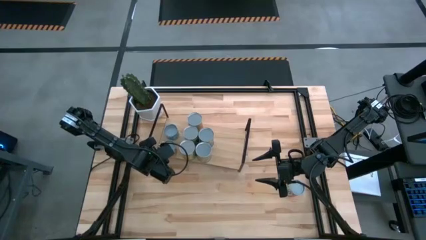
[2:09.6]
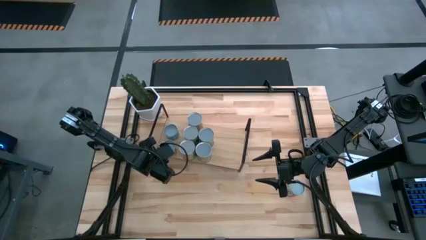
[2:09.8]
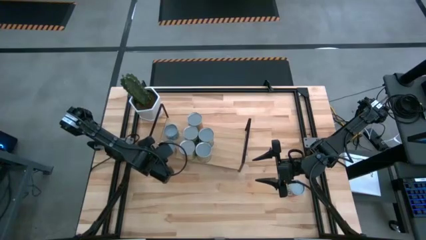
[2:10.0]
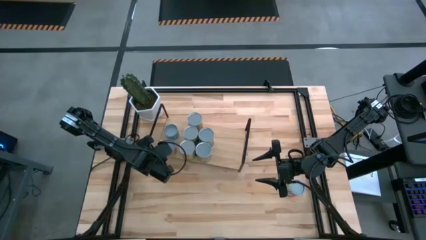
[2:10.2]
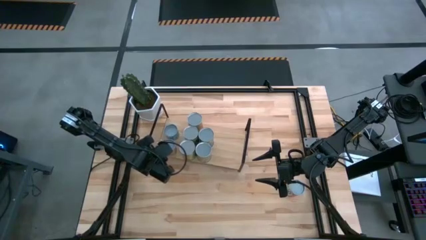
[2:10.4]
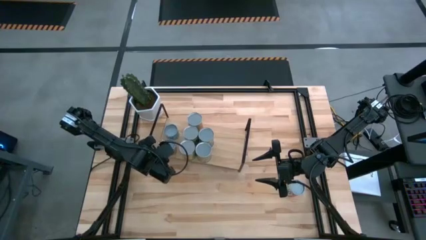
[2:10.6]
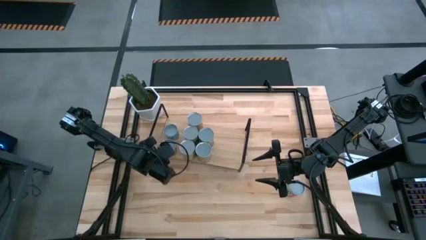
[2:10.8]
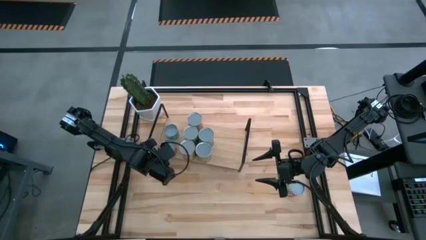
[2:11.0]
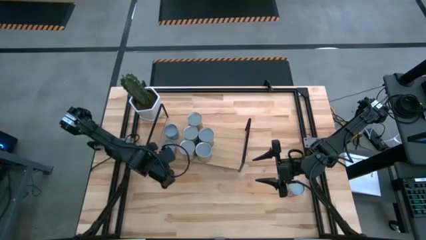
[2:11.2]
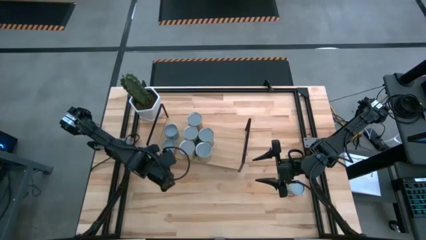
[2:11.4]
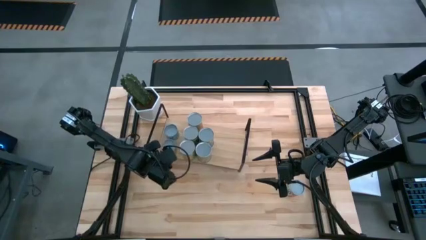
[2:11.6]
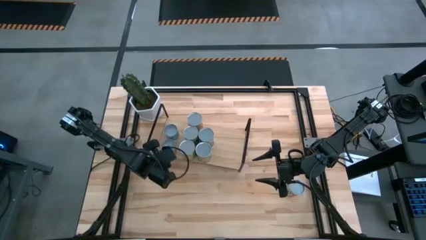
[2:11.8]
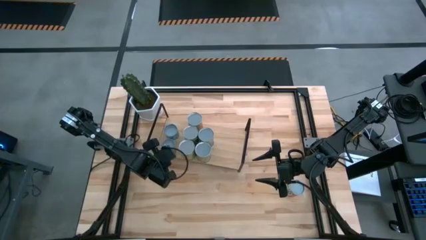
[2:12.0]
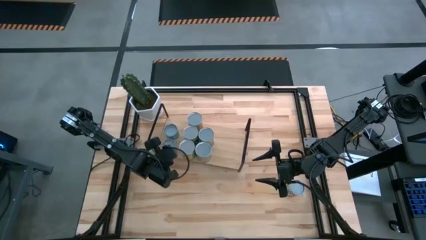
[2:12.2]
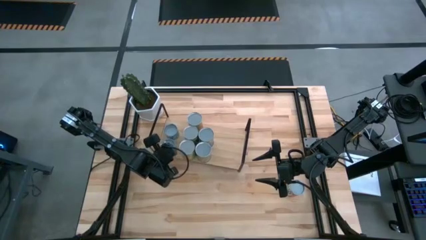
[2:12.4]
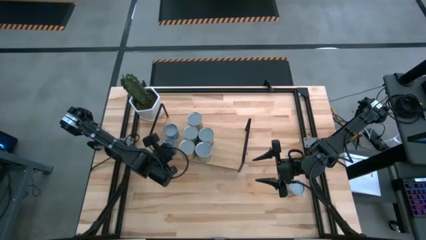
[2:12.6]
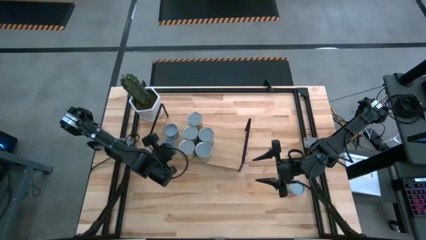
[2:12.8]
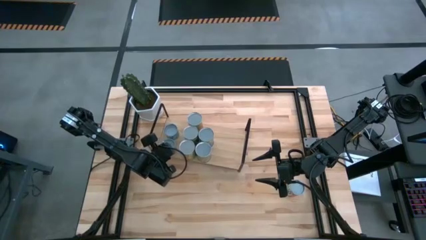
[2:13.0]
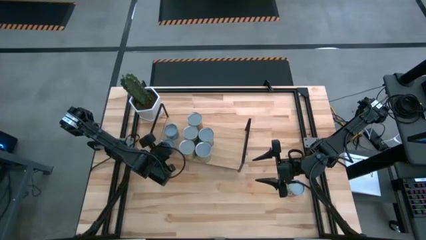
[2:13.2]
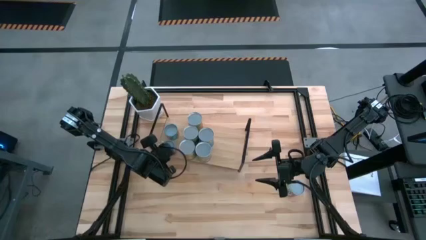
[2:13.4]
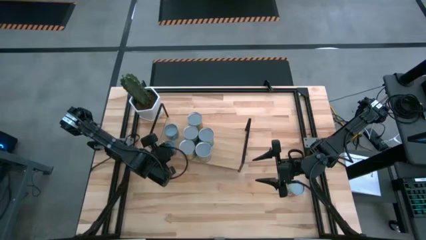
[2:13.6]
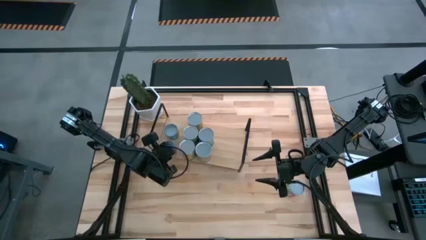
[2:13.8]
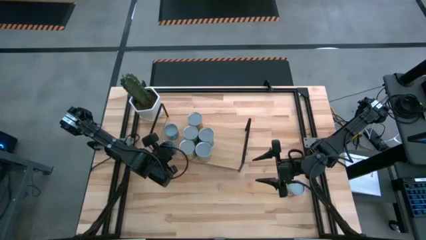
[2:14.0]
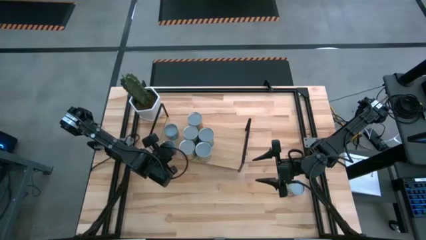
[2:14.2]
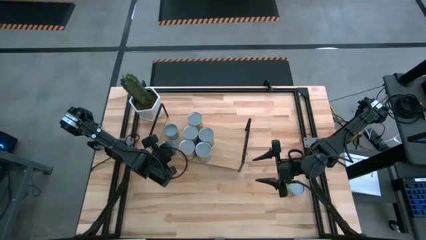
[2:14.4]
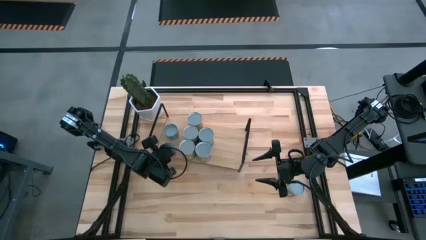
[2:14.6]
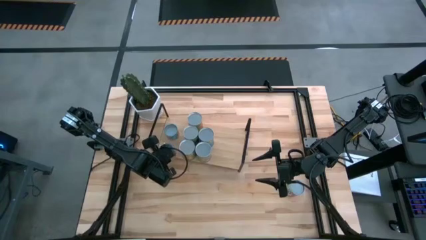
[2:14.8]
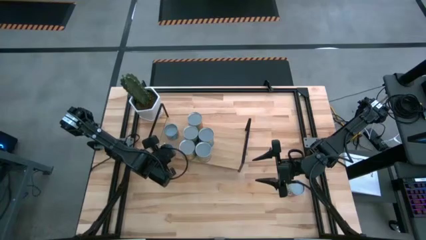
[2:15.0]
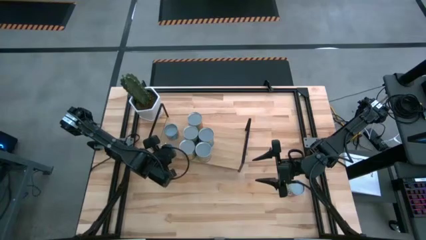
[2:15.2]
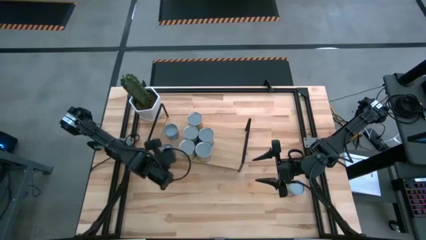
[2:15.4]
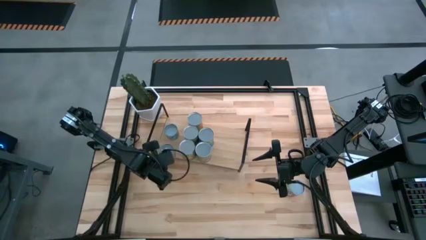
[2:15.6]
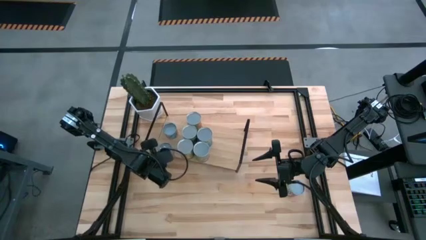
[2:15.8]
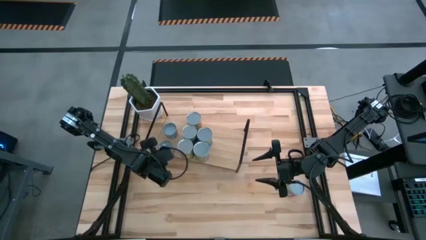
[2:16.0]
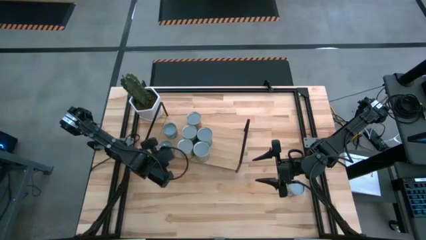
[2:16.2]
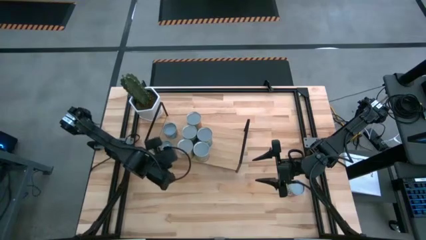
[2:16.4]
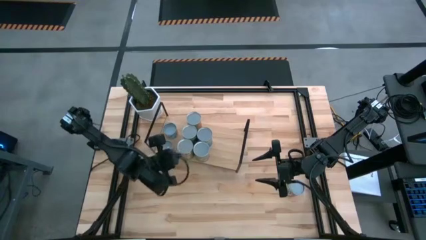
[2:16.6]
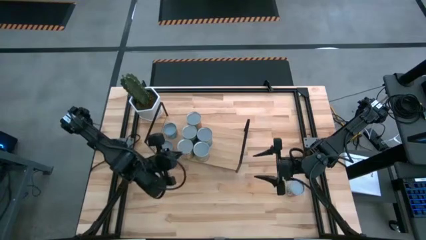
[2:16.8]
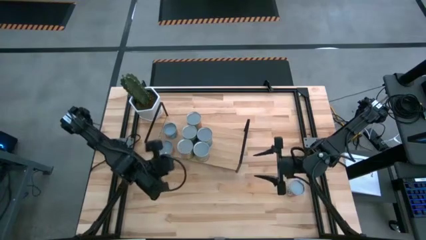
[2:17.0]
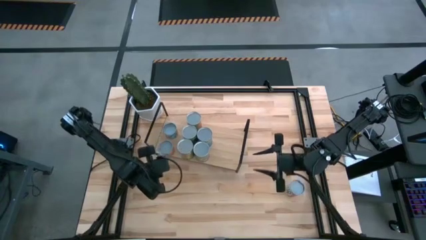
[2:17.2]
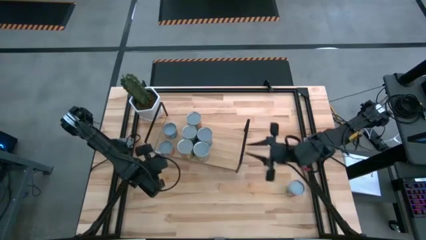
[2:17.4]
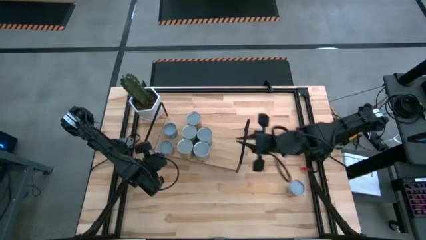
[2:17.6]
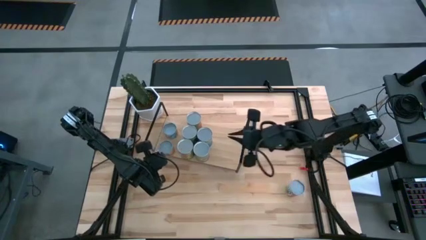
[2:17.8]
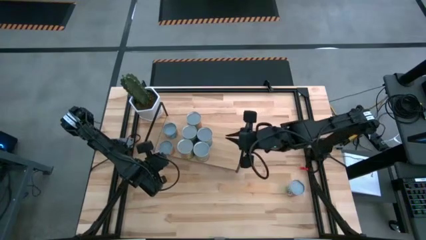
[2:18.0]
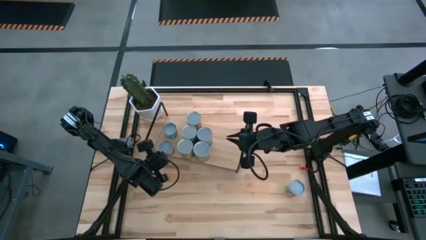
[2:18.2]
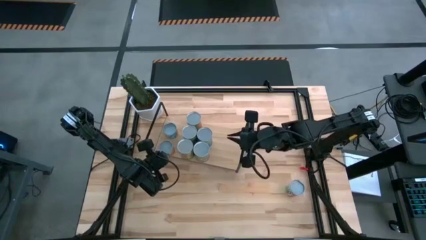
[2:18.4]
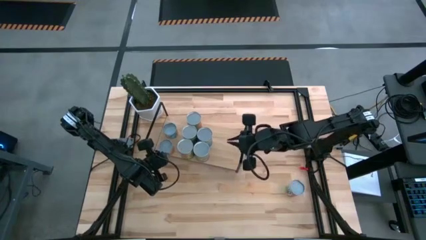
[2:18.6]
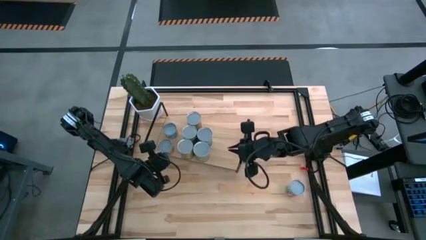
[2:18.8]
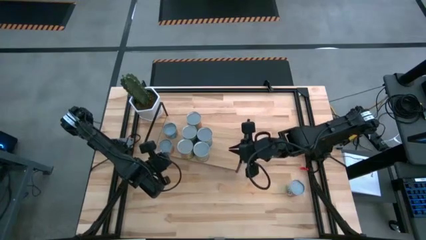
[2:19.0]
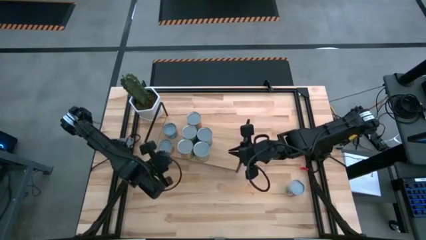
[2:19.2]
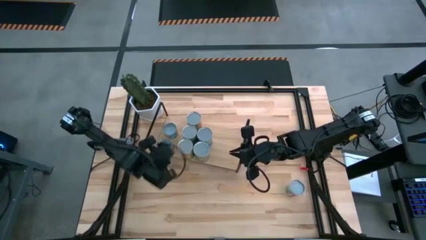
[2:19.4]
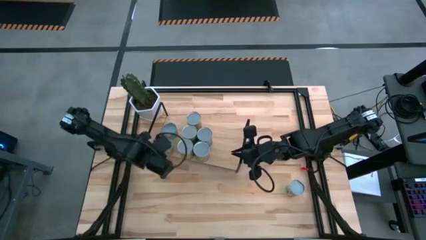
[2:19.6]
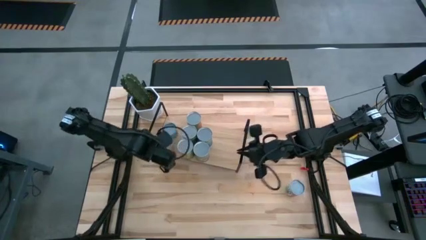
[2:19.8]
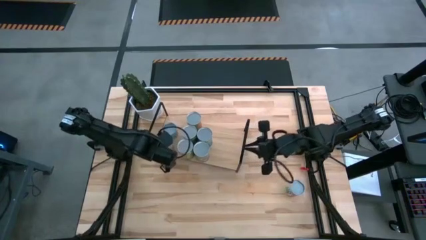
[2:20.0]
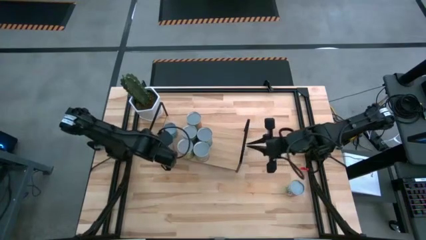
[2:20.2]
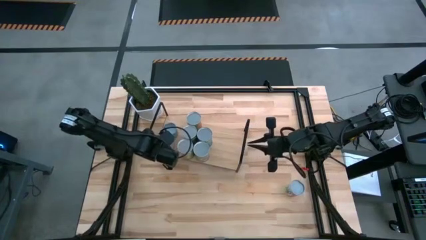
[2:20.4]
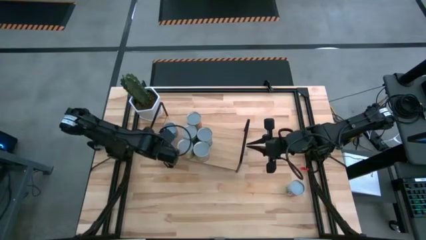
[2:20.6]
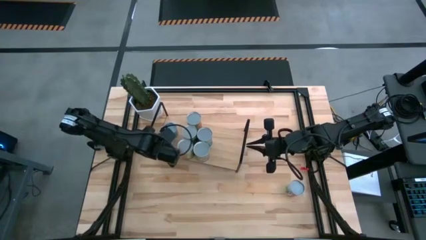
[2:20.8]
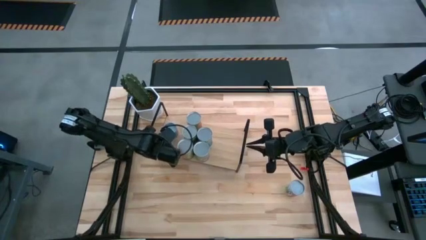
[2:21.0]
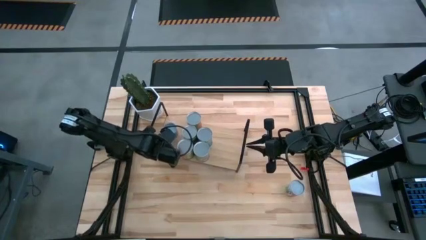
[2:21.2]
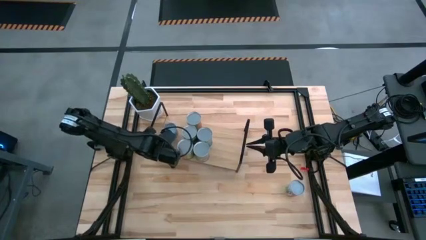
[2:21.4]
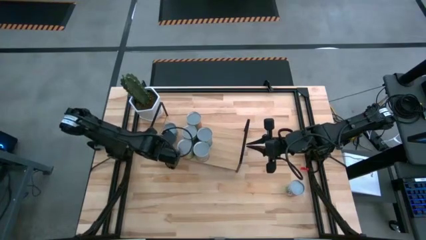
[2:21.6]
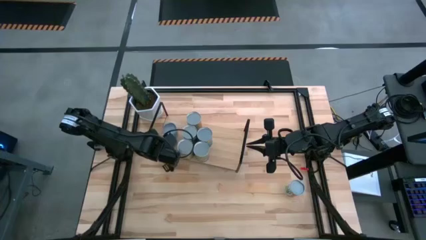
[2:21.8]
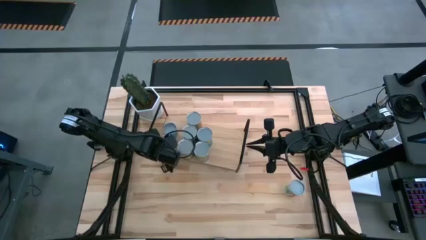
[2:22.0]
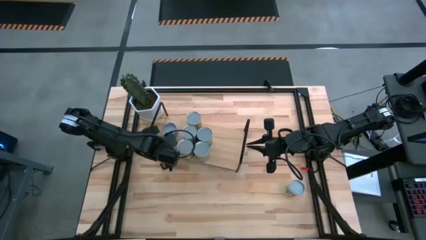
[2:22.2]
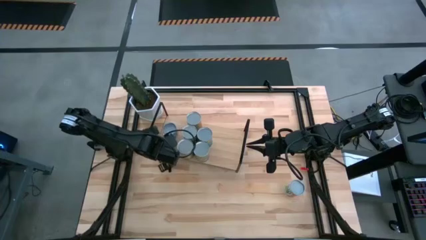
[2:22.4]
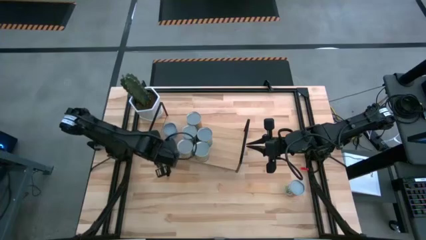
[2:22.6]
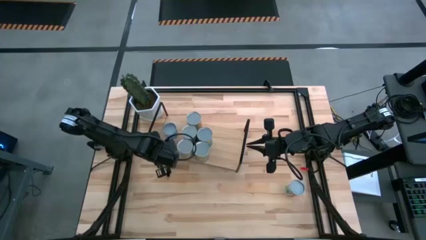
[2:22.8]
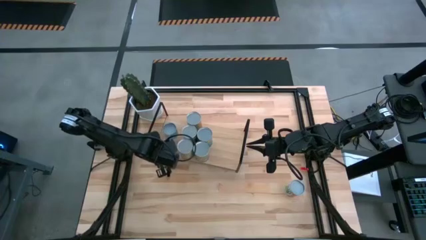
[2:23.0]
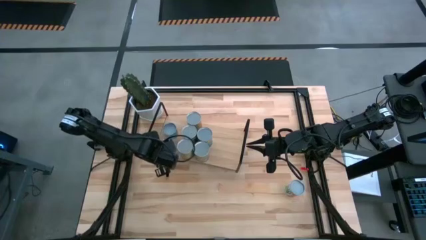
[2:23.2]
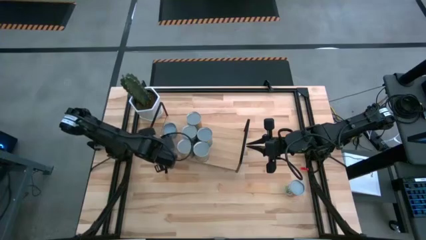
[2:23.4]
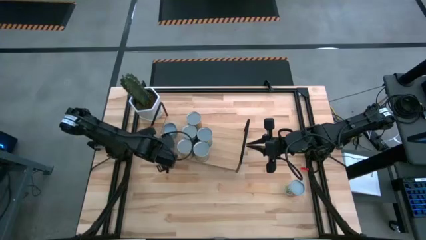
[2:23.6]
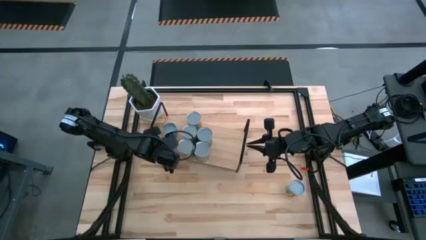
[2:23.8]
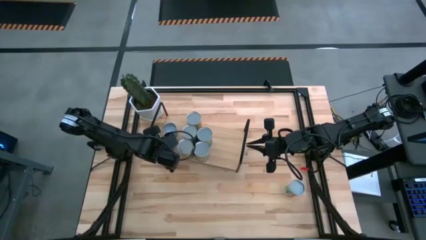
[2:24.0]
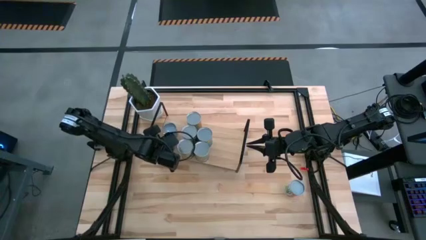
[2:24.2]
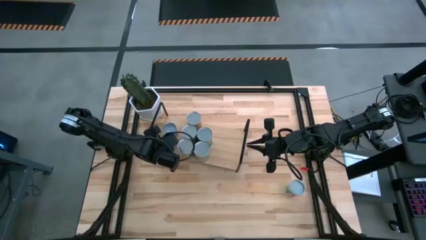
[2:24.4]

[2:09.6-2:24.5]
Task: Pick and place cans onto a shelf
Adjust the small canned oranges can on the shelf

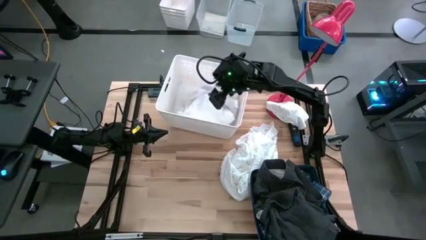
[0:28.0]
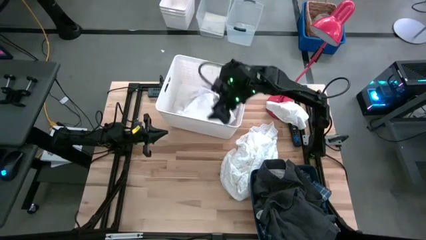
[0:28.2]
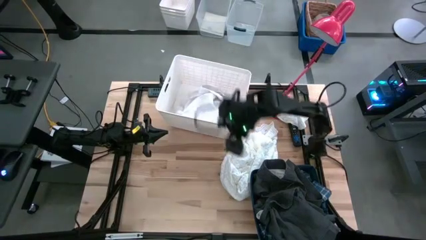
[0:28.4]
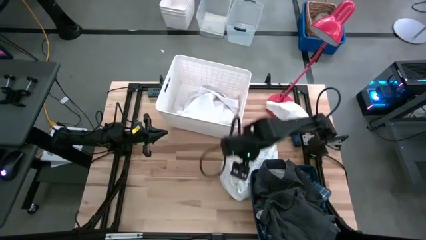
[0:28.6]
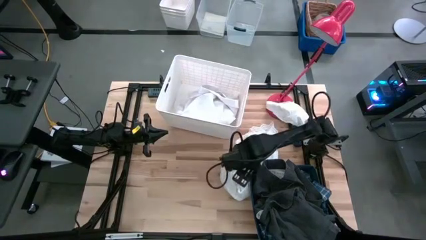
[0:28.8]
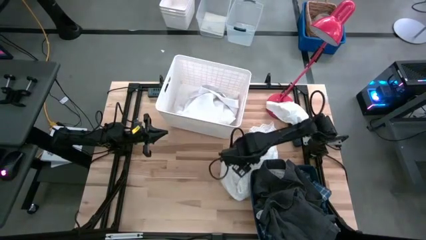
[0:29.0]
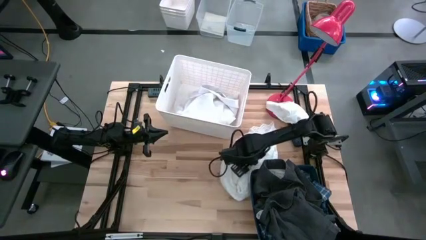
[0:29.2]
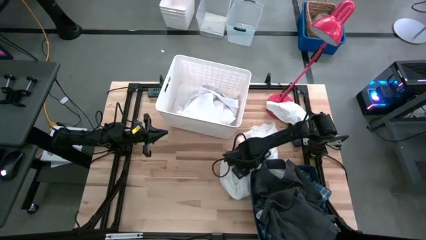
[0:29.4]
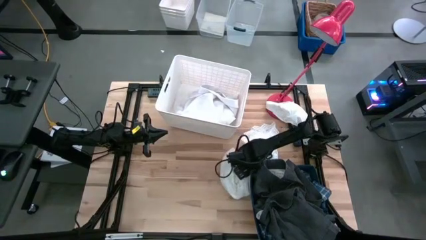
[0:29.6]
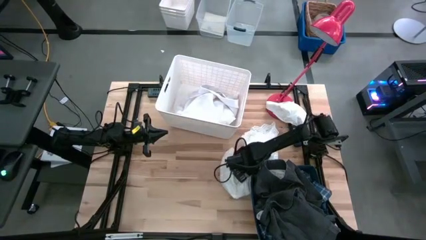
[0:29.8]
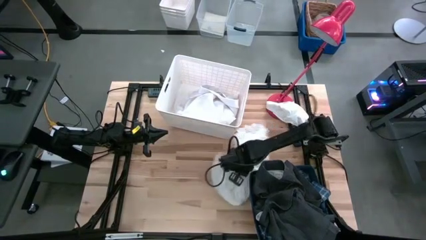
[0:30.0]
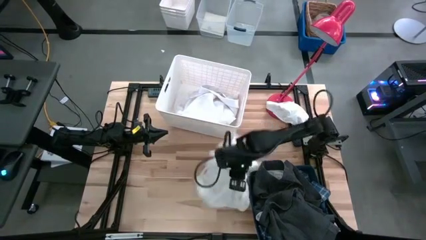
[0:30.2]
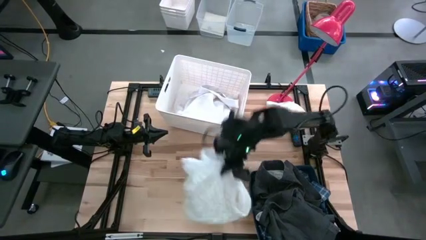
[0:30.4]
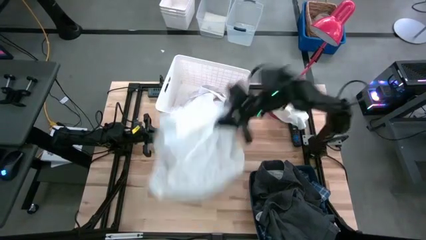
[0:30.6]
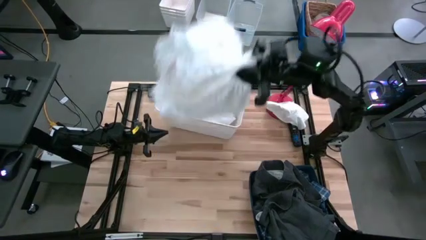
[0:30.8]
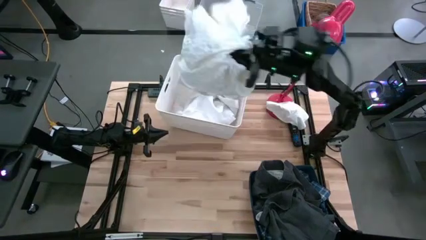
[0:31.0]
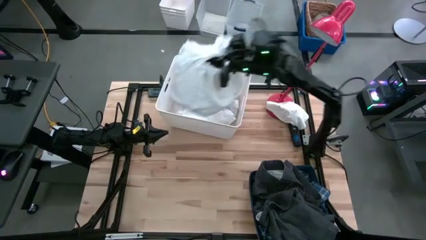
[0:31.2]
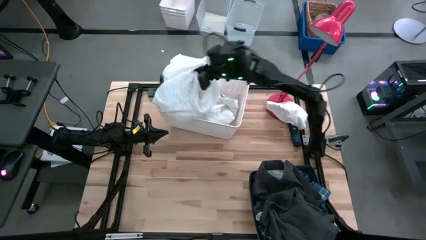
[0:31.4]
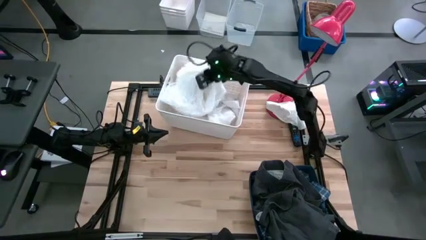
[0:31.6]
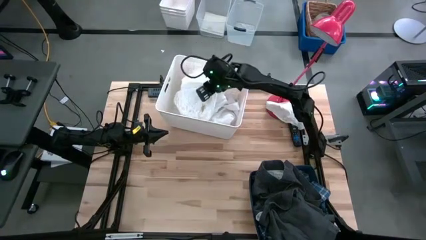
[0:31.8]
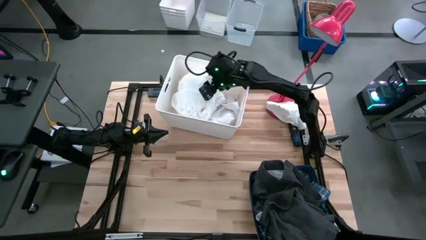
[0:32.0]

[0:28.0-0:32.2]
Task: Sort clothes
Put the white cloth into the white laundry bin
